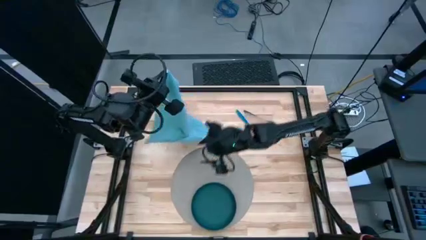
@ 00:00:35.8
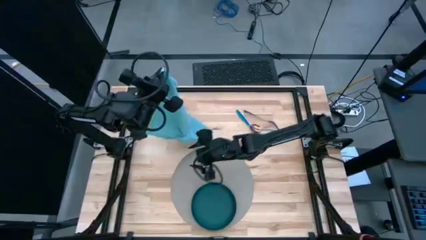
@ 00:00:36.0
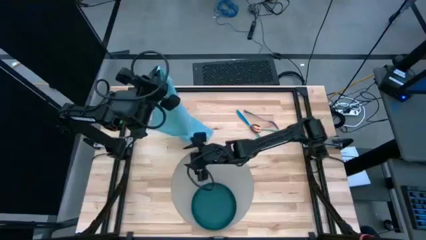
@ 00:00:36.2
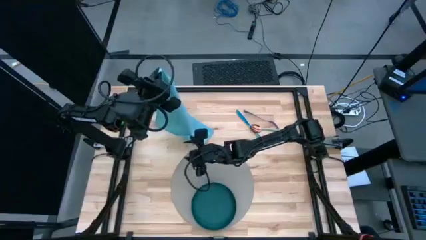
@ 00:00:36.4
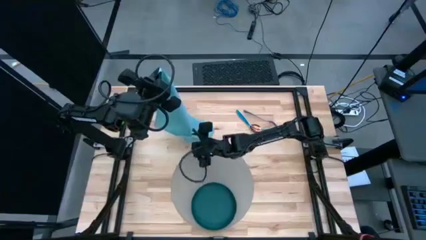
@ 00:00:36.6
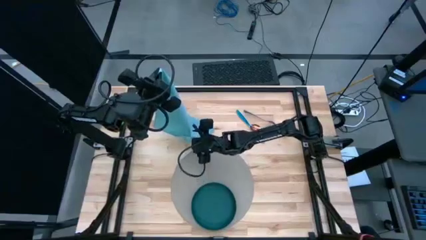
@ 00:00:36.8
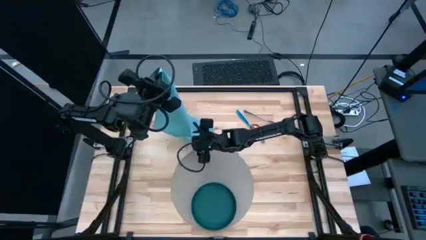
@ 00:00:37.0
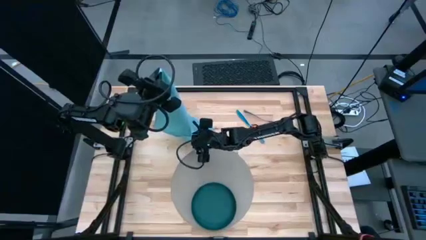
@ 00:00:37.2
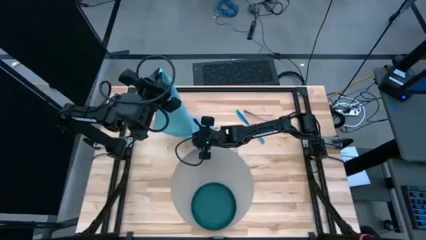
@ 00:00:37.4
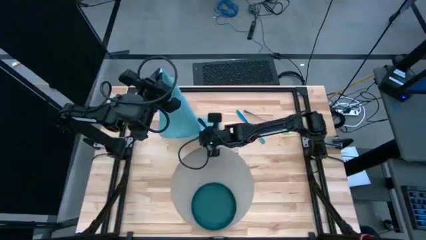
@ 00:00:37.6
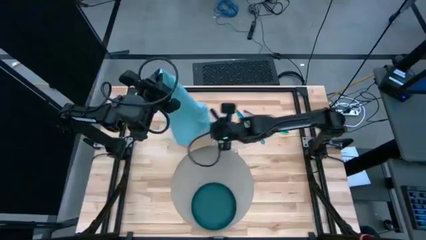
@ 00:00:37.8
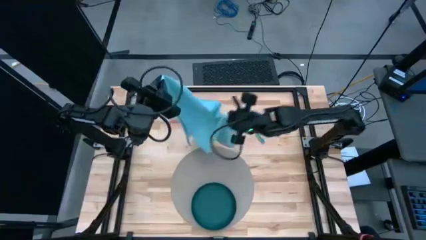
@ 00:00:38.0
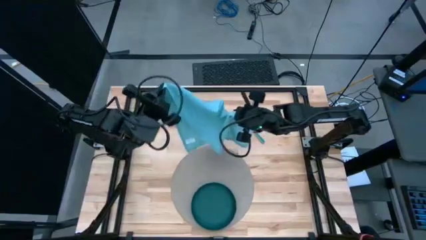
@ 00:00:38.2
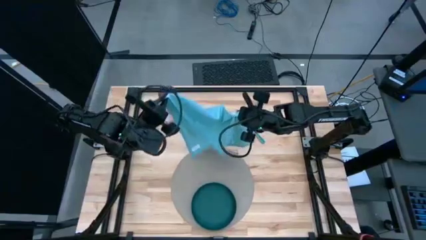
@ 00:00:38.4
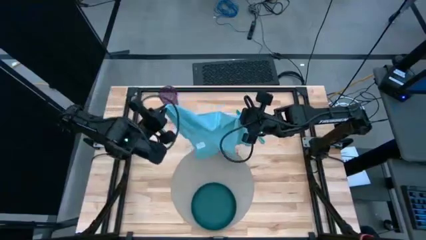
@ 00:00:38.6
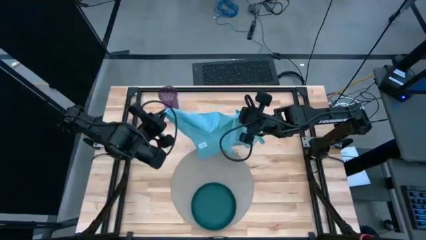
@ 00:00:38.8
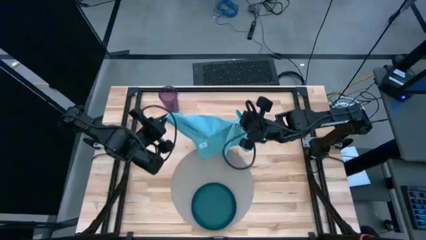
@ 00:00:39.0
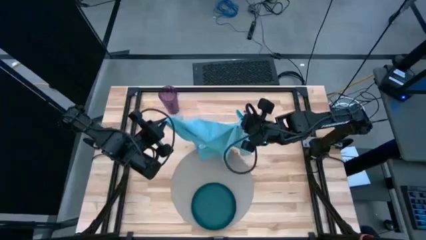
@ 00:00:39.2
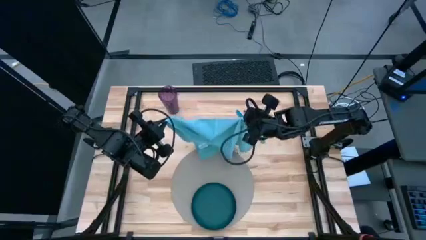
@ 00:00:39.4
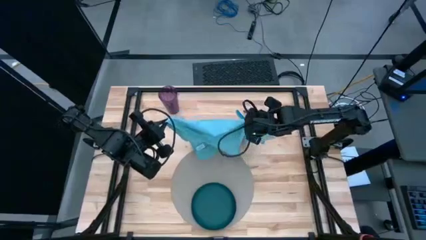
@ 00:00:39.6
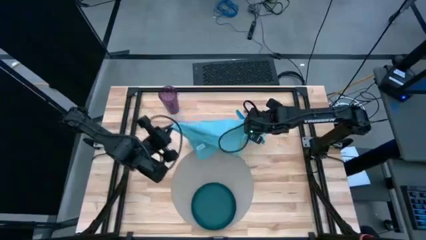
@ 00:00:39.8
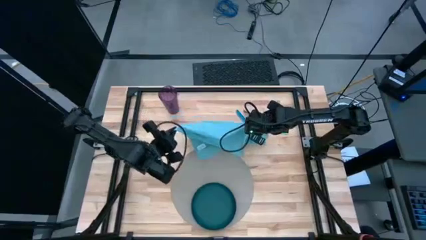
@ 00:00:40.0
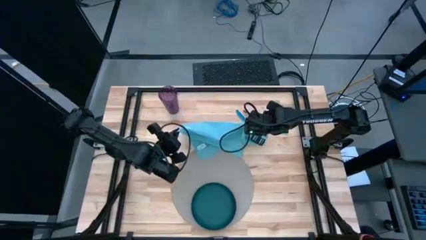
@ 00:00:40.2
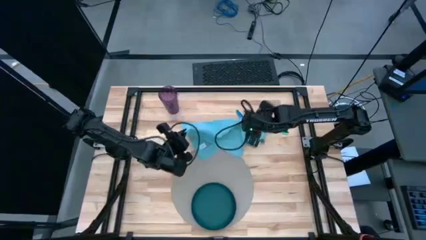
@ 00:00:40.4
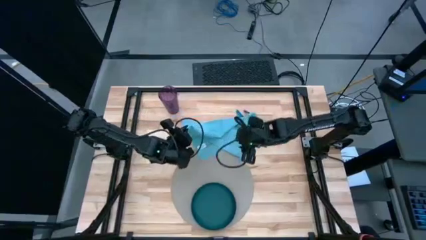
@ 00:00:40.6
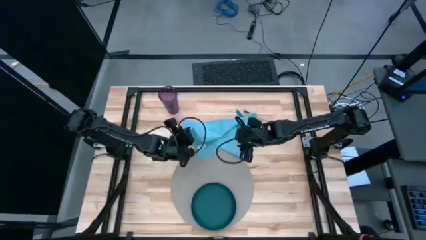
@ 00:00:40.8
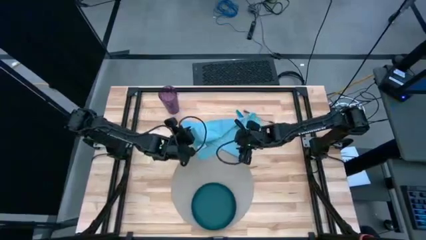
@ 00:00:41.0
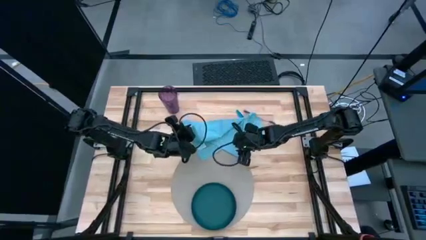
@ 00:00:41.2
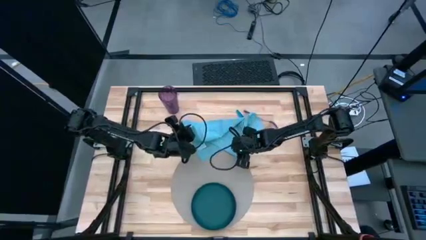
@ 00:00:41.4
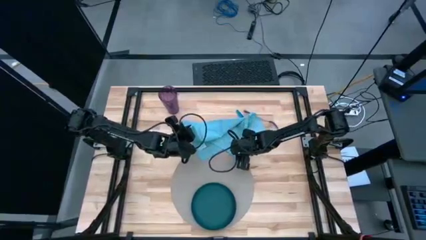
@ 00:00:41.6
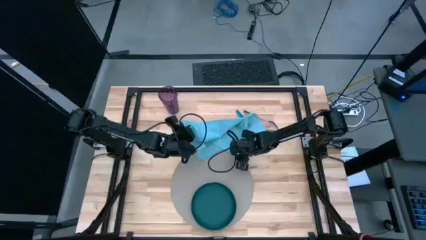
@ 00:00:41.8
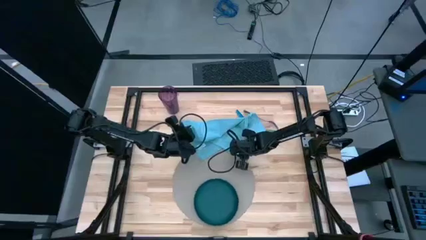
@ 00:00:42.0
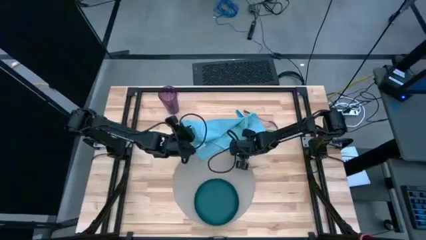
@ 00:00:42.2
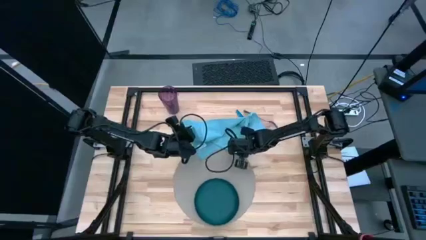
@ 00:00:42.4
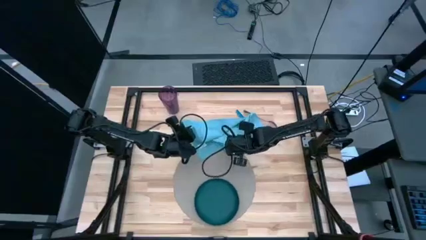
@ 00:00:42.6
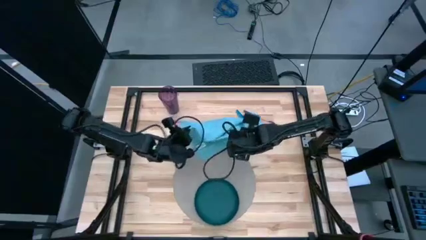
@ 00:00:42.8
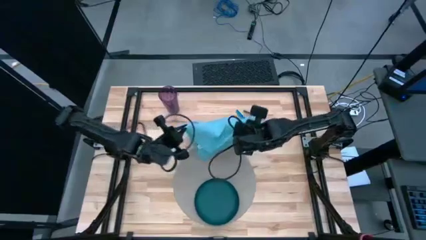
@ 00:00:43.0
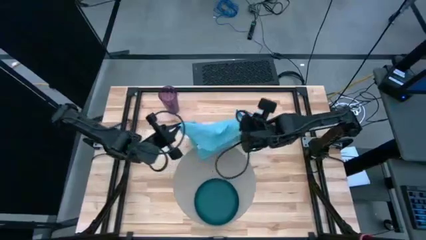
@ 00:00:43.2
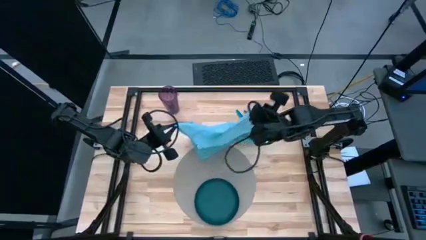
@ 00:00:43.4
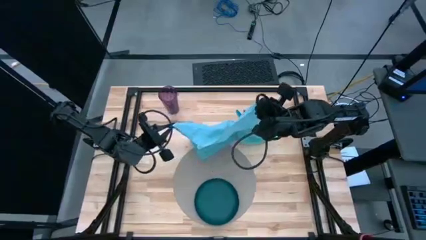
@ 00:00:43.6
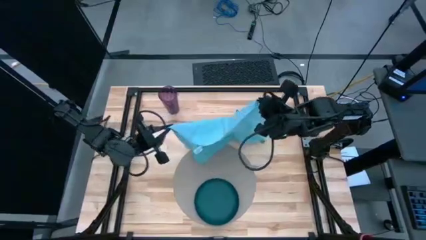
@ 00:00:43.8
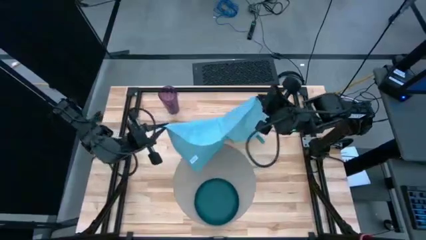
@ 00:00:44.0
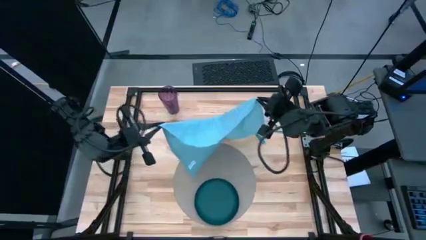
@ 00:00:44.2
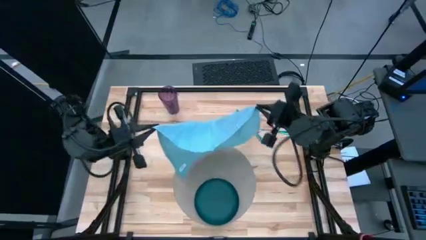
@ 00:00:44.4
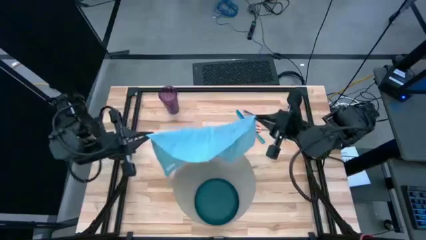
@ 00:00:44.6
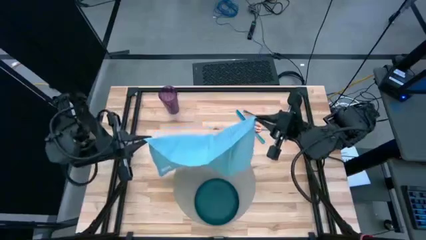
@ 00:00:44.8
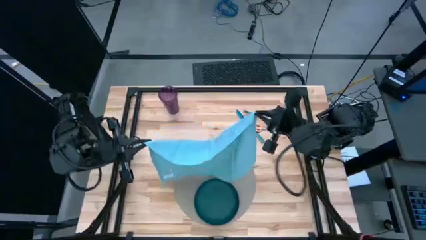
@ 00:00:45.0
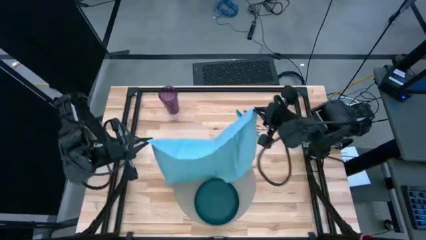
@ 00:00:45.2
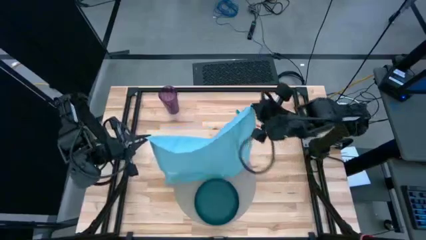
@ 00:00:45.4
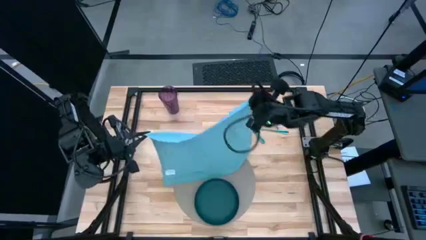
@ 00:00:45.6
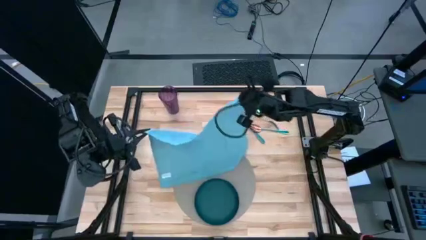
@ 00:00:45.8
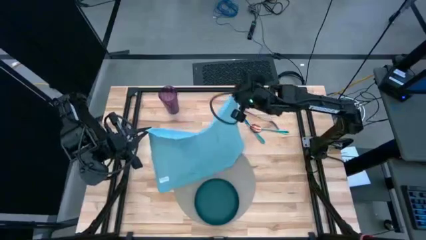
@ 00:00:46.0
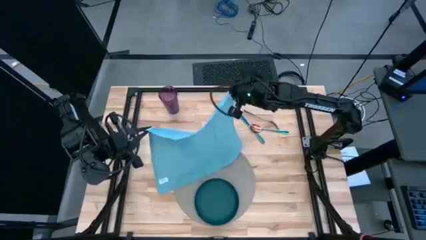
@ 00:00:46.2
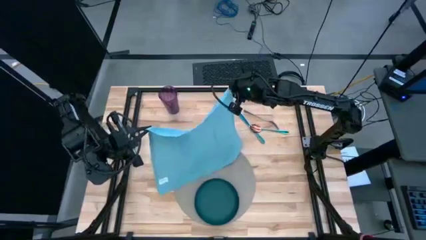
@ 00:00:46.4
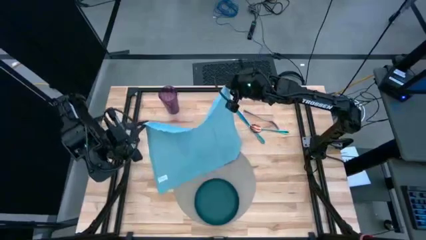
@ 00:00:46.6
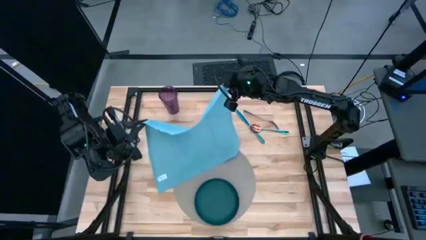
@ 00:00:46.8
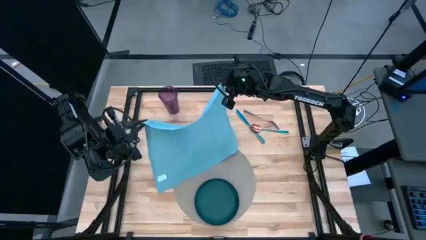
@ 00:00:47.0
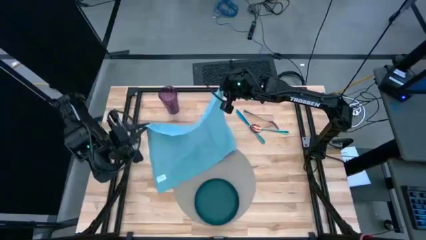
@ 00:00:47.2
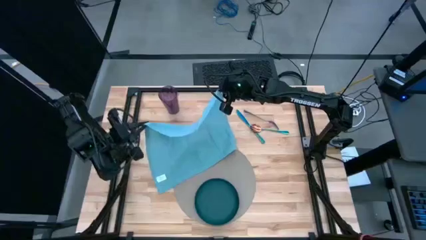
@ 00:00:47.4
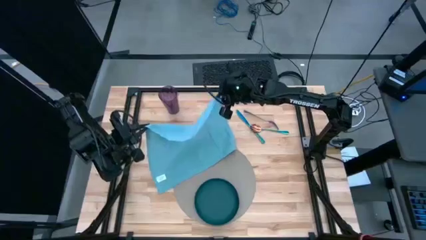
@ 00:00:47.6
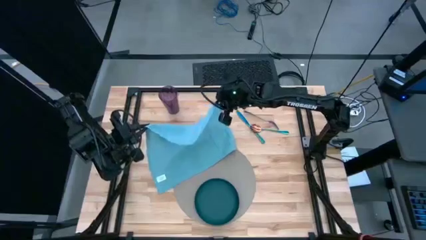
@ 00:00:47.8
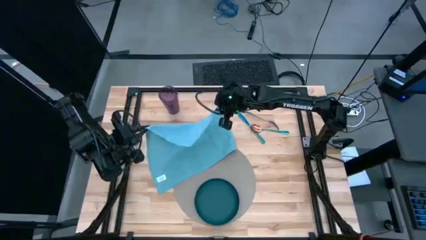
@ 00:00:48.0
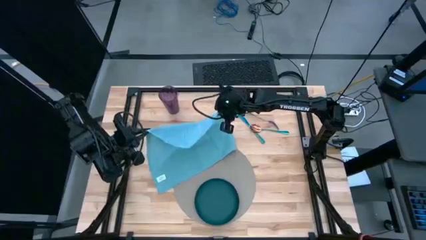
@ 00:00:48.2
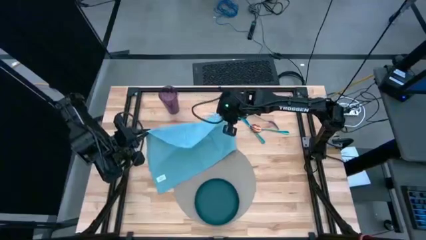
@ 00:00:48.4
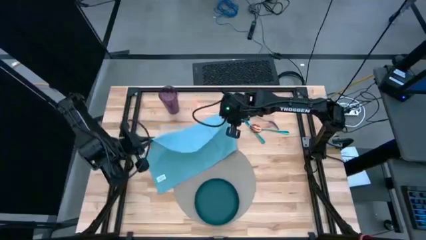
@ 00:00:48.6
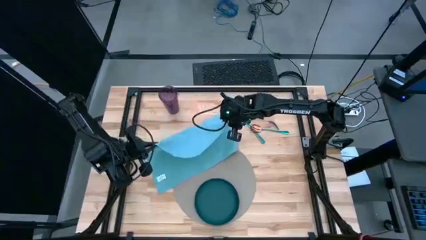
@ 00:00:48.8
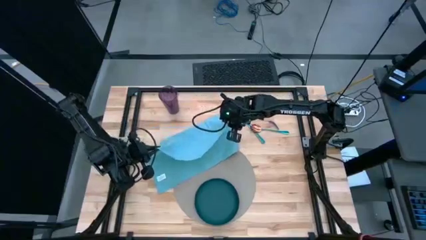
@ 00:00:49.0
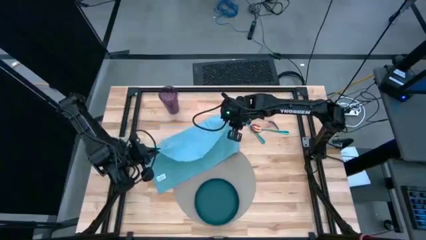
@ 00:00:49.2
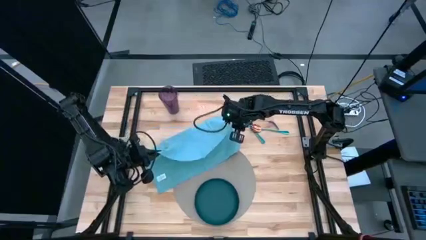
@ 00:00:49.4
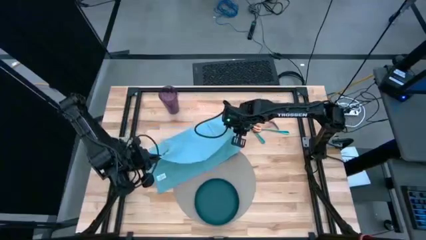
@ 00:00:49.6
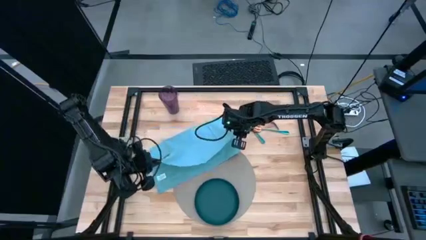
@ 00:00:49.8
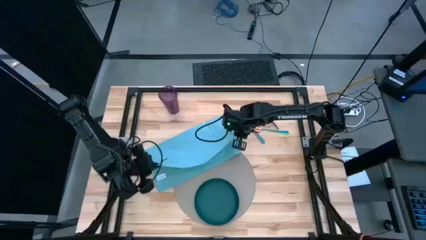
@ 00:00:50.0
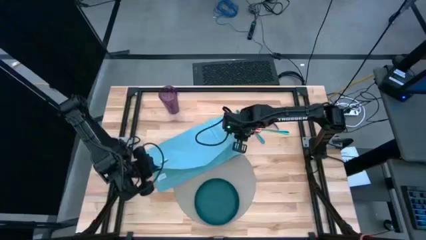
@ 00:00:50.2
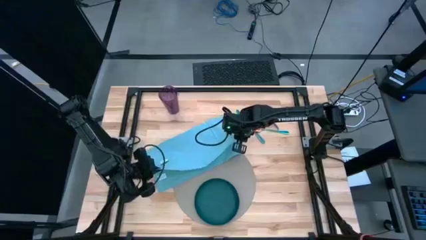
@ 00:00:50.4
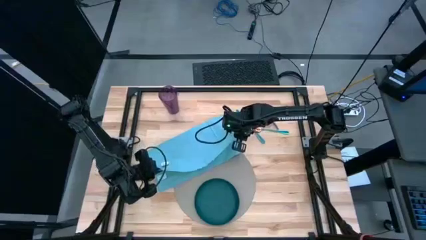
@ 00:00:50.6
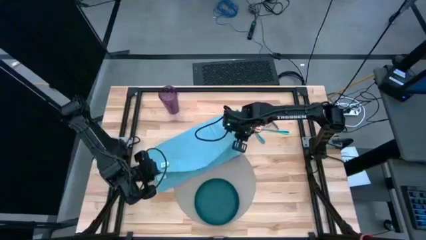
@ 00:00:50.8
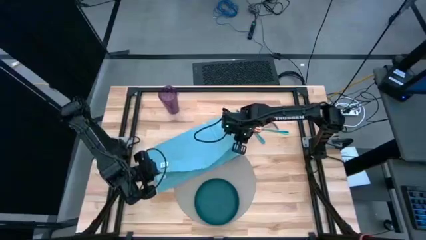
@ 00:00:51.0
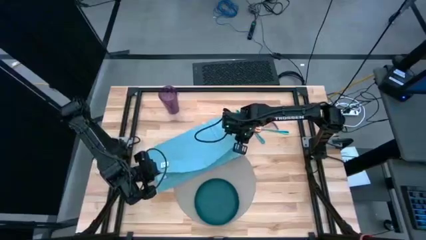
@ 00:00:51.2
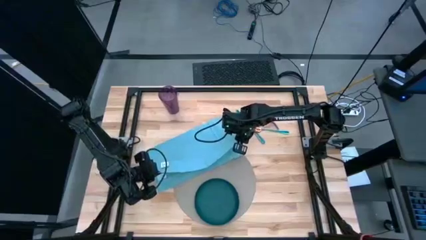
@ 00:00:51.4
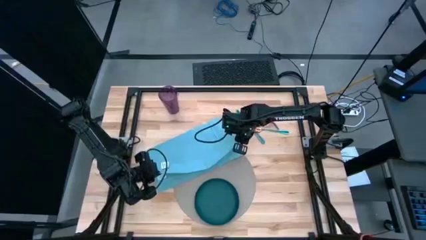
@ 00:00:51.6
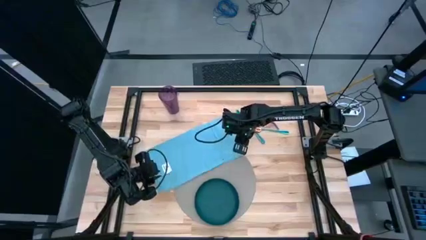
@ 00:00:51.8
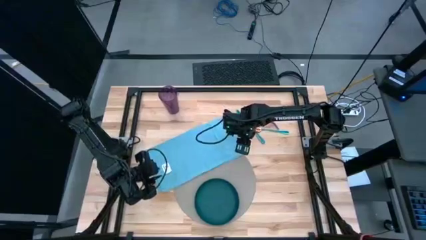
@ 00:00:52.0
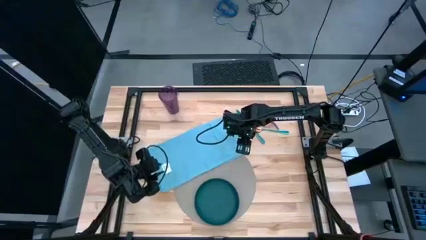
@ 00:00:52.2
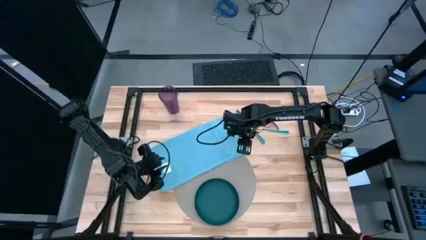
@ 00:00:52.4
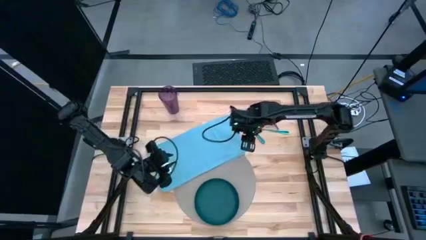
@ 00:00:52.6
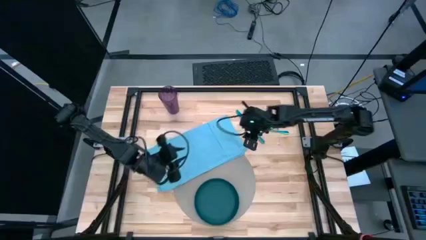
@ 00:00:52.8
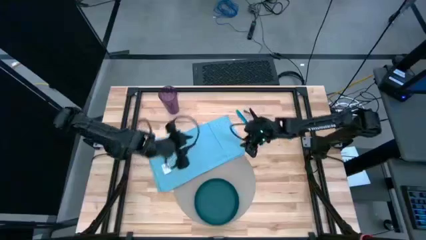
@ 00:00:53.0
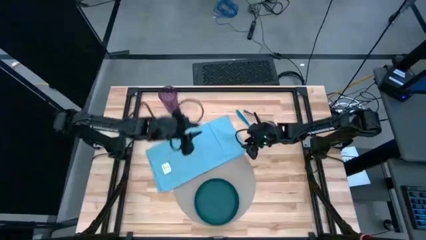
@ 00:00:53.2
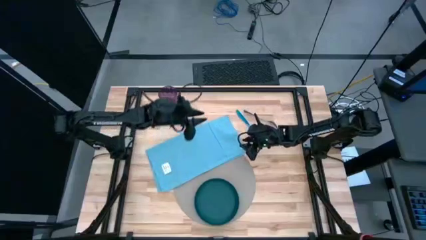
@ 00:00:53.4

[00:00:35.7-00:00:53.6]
Task: Set table place
Fold the blue table napkin
